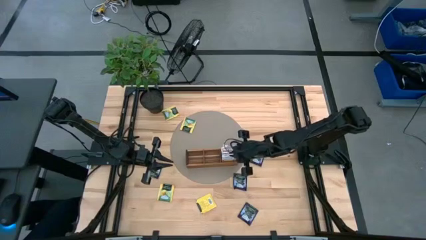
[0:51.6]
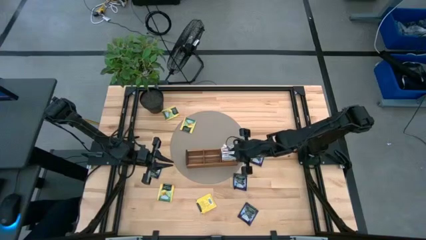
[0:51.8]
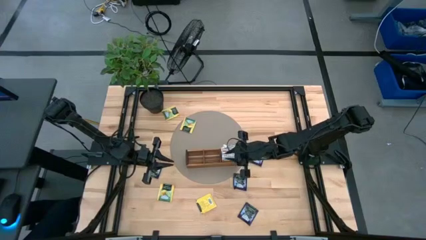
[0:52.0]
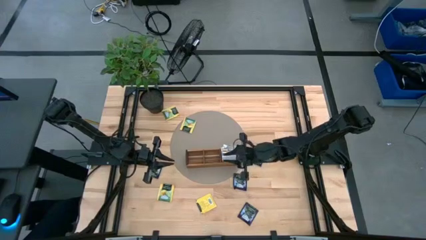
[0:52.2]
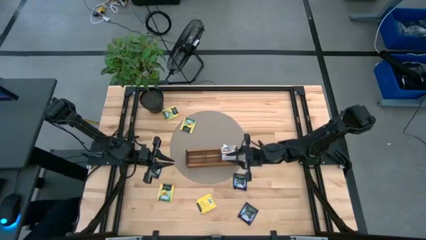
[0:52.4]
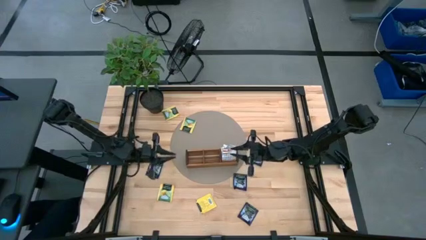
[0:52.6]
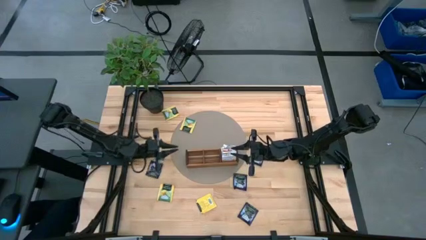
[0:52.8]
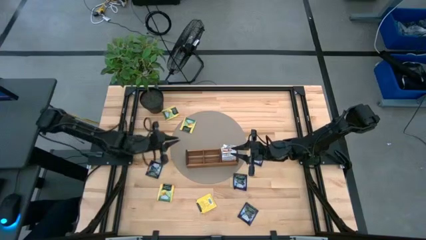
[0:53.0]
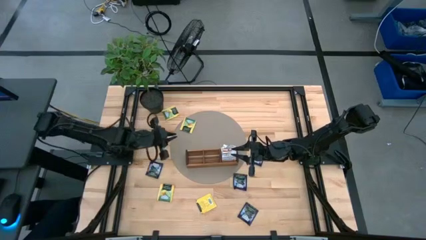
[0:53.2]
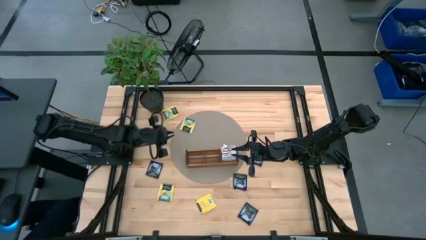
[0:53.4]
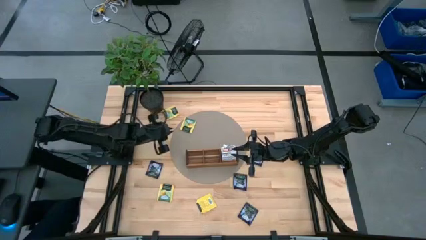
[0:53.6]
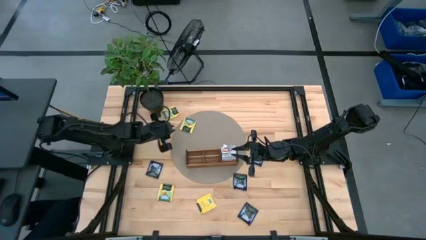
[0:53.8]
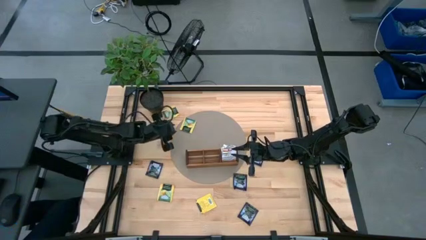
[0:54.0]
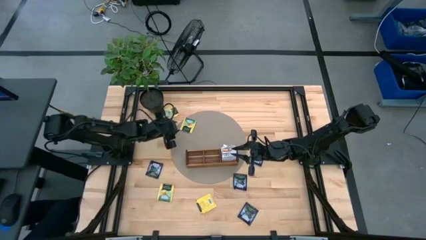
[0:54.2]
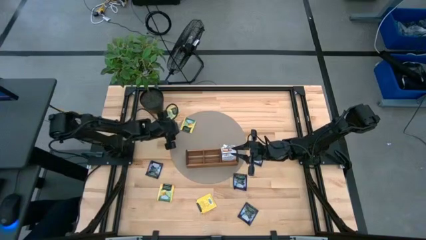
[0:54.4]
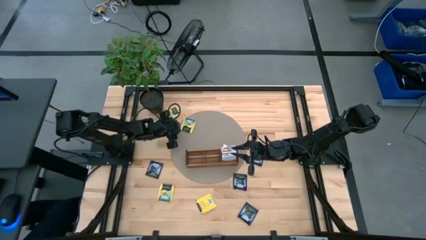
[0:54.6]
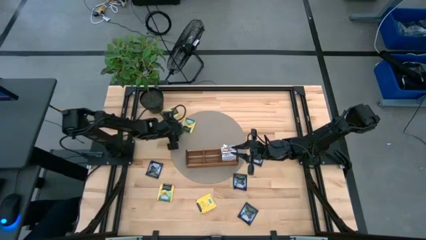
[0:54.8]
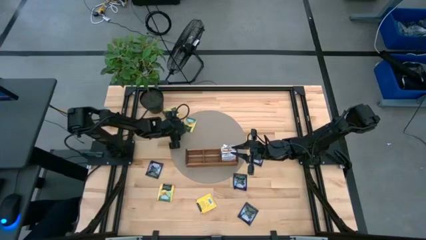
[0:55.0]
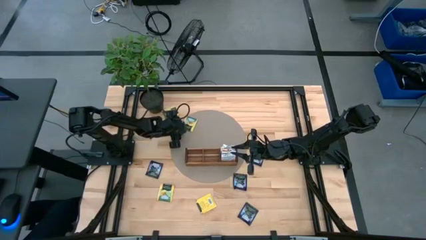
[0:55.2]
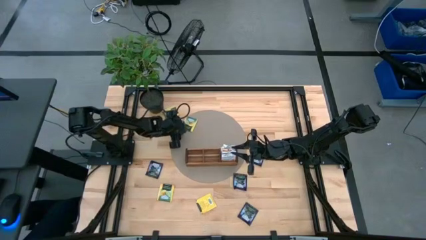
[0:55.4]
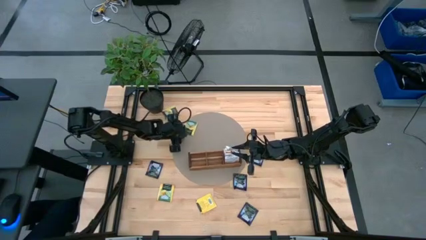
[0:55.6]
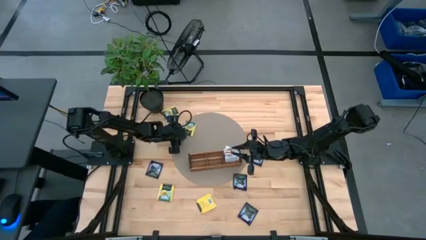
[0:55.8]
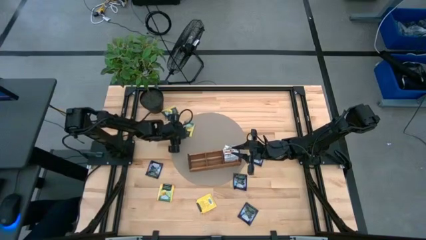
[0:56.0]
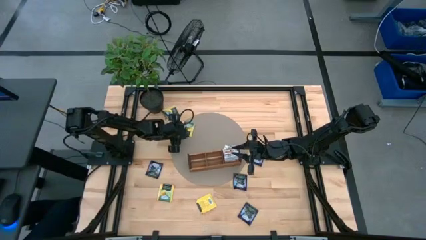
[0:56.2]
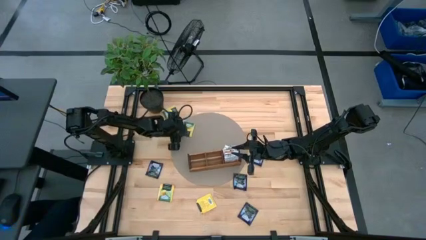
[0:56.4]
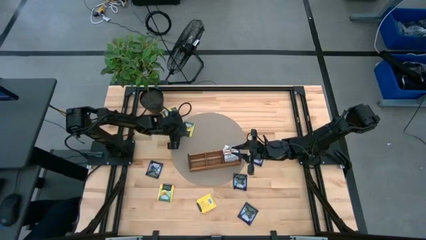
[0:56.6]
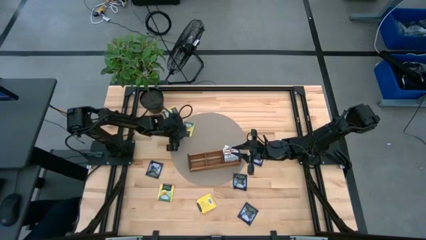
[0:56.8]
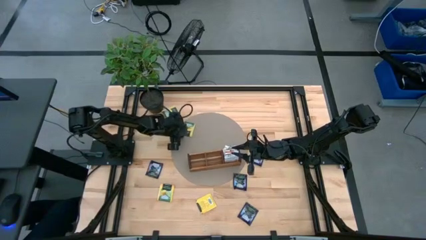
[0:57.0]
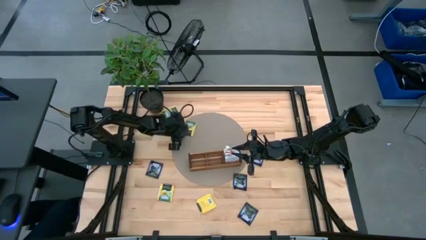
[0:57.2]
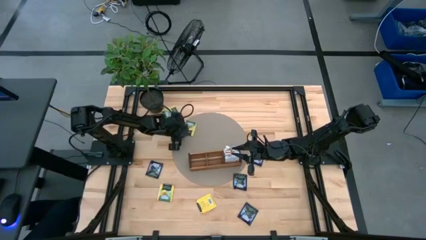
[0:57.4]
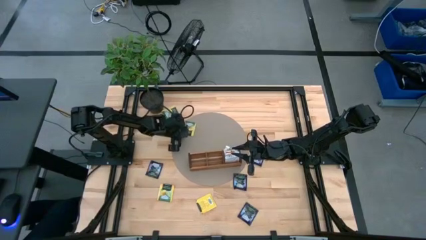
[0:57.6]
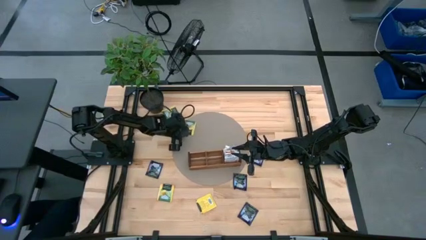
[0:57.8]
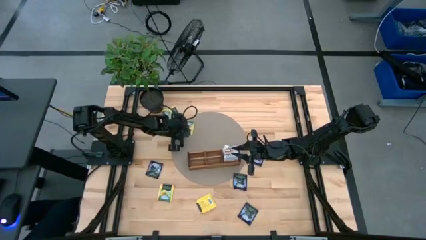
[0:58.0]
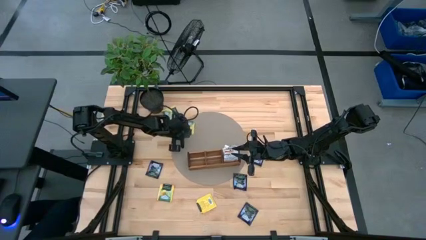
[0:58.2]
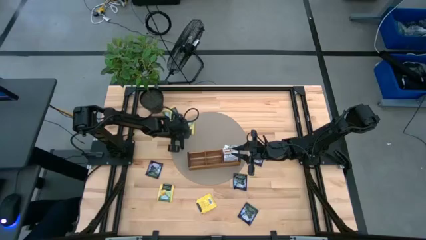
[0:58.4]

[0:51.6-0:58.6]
Task: Pick & Place Tea
Put the yellow tea bag into the middle section of the wooden organizer

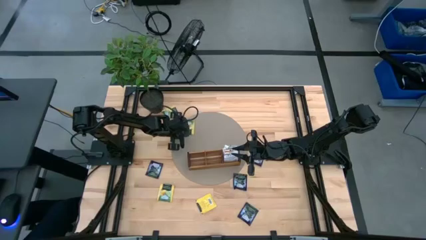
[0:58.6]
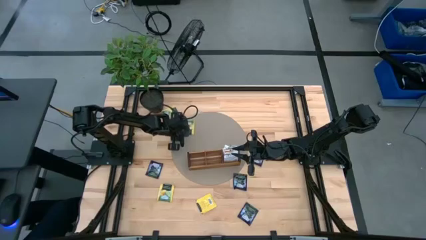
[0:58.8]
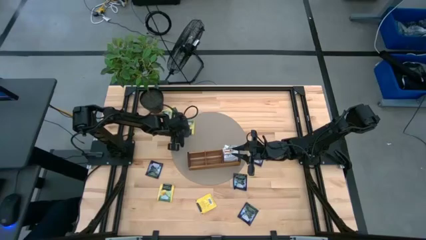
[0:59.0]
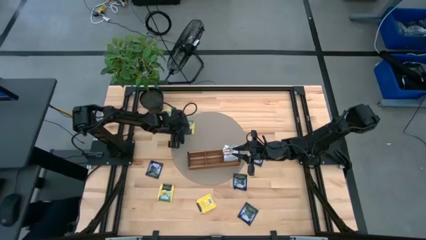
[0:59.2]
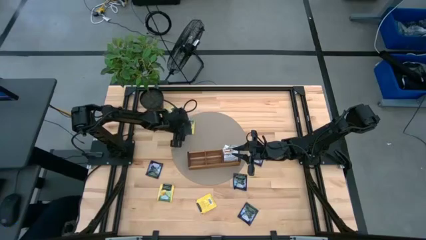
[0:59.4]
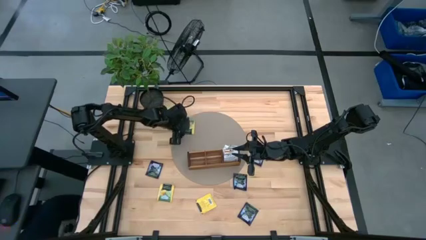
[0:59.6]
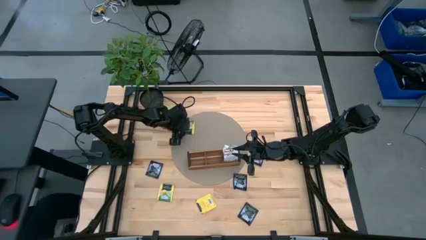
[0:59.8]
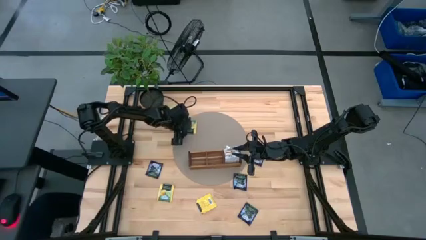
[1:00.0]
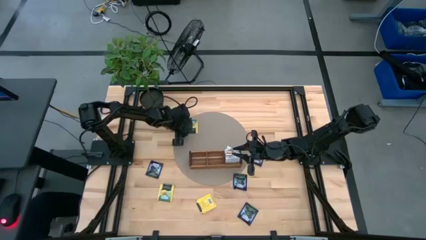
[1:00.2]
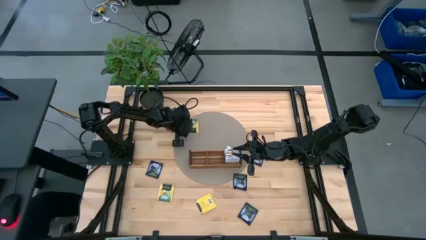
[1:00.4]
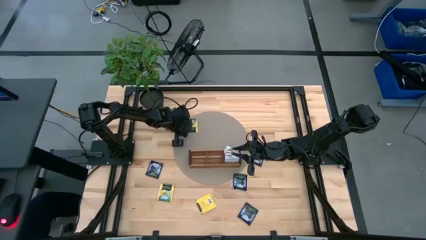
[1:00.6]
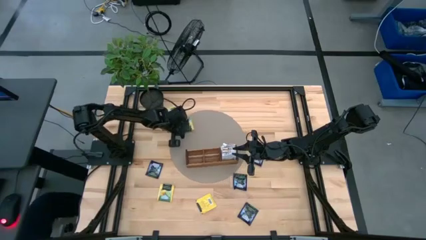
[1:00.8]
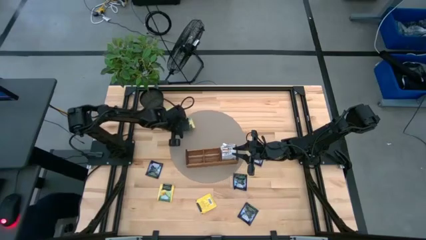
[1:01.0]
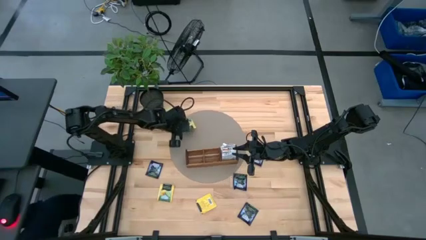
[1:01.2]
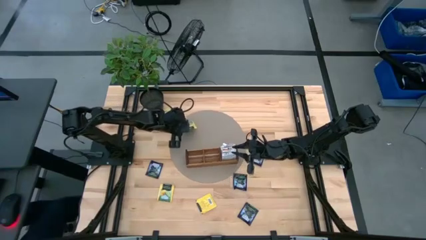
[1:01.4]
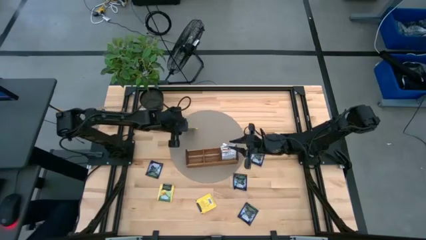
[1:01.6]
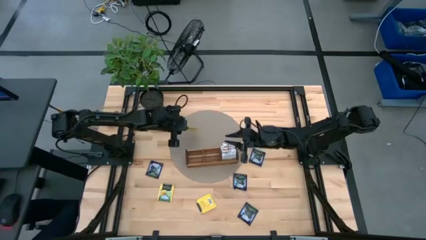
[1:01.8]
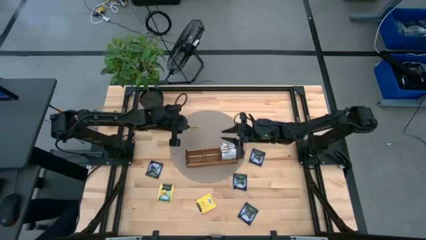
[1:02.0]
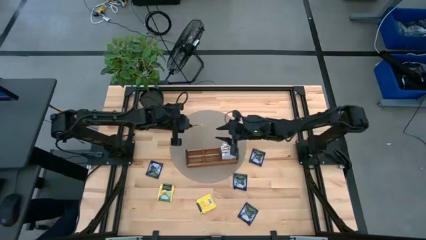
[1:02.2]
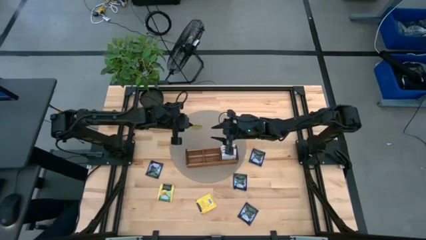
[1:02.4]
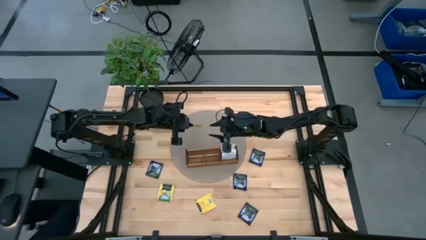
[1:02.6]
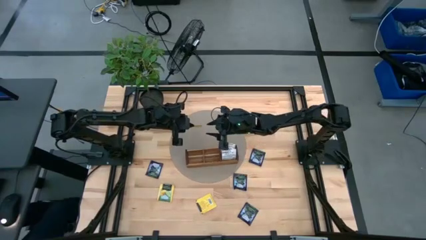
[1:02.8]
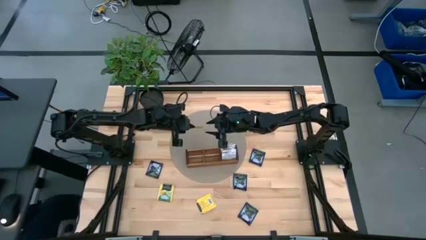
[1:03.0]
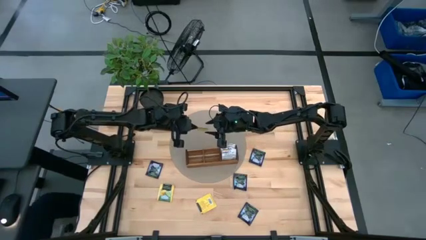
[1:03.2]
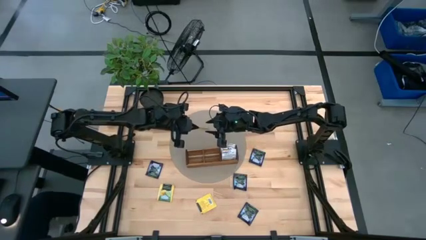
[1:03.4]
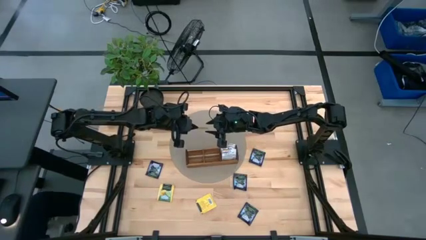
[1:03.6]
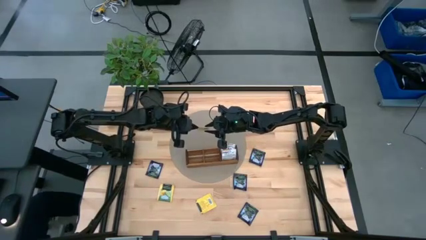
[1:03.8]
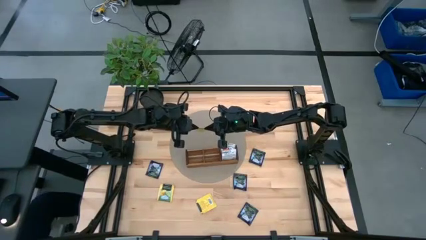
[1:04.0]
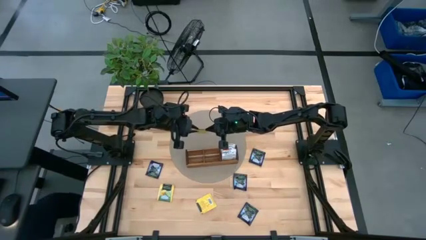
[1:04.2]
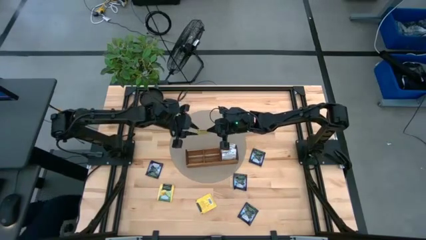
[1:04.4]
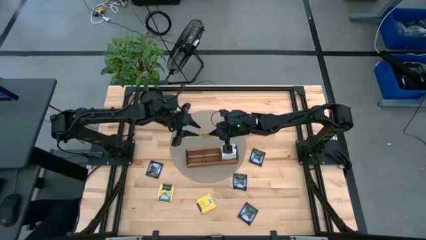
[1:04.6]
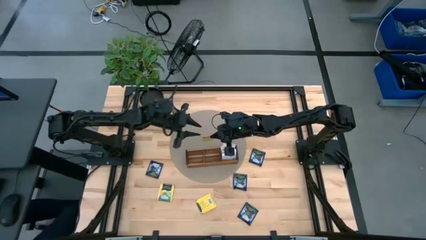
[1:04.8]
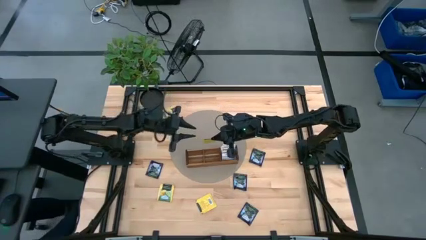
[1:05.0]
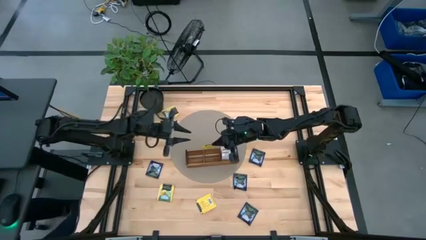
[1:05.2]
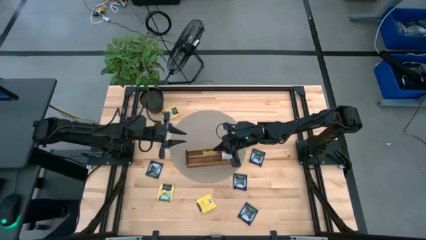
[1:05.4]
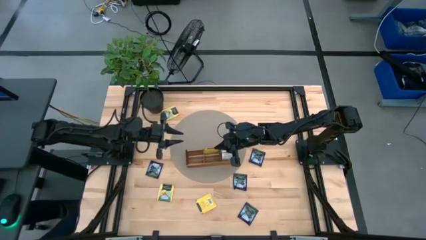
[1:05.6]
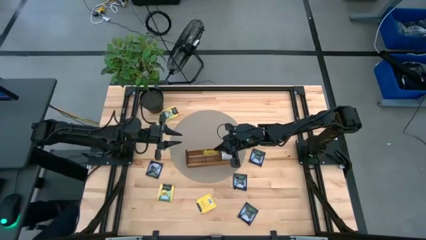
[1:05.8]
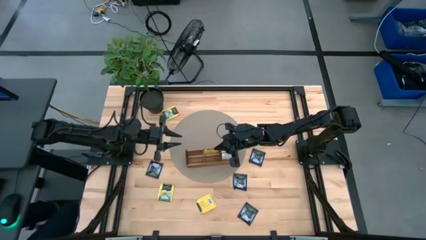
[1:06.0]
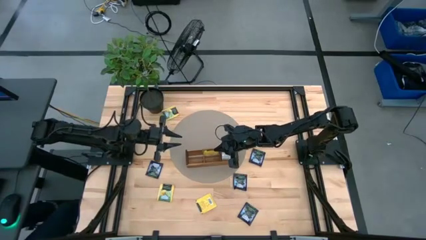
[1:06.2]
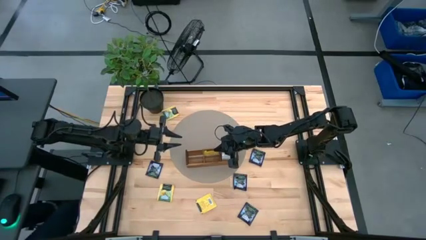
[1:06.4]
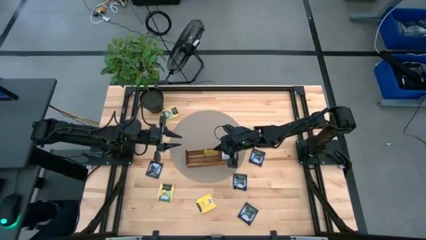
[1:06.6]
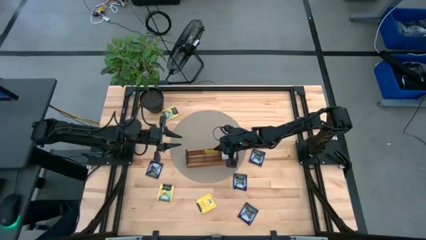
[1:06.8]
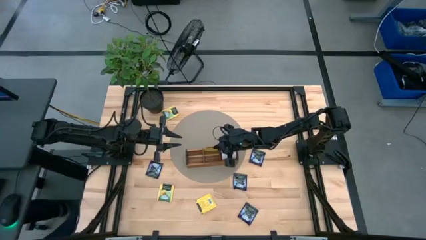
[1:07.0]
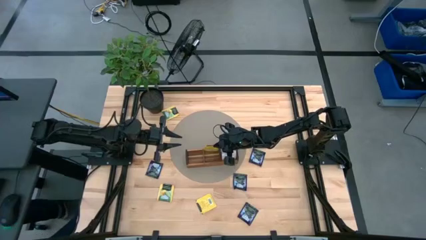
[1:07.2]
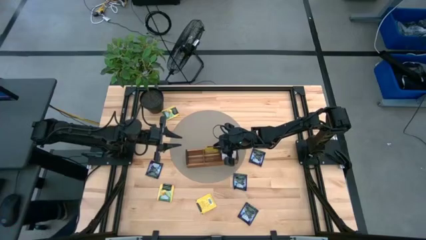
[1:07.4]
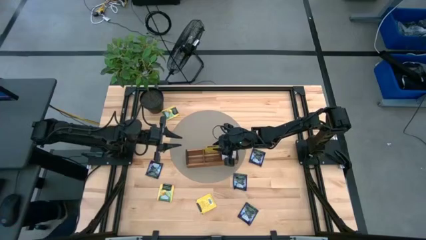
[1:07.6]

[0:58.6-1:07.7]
Put the yellow tea bag into the middle section of the wooden organizer

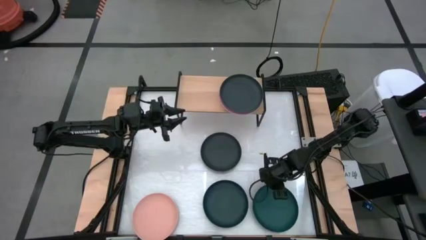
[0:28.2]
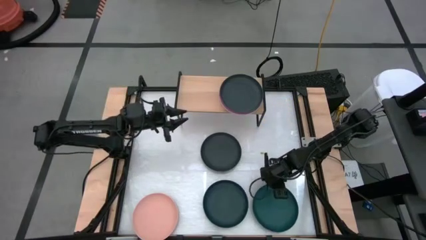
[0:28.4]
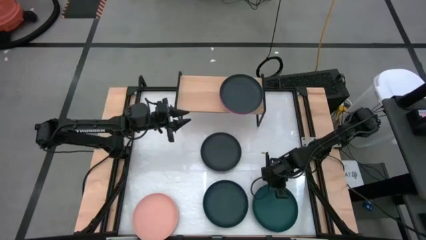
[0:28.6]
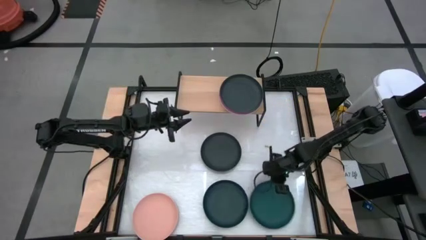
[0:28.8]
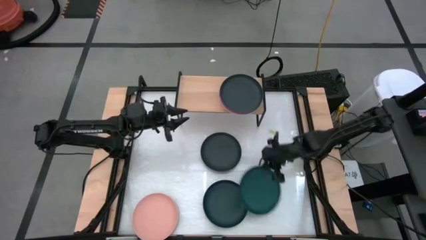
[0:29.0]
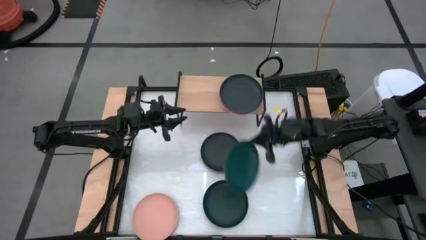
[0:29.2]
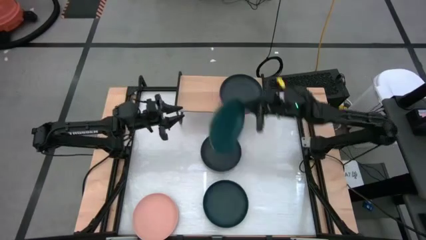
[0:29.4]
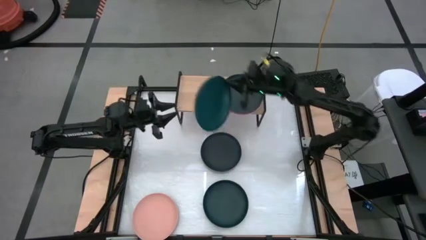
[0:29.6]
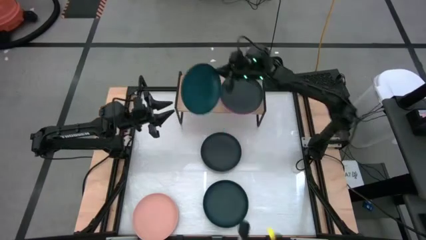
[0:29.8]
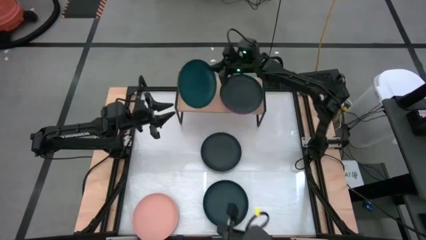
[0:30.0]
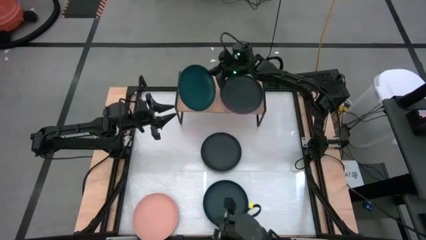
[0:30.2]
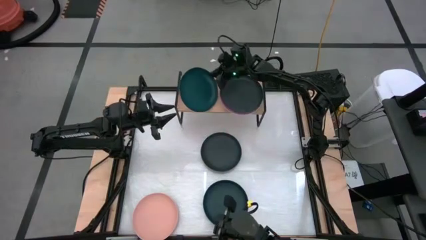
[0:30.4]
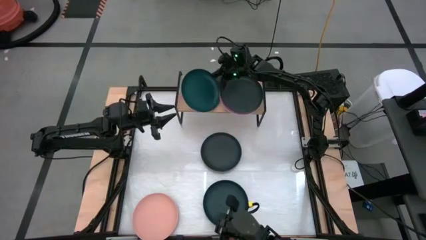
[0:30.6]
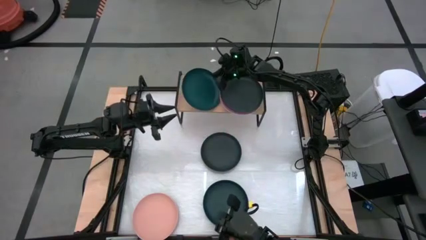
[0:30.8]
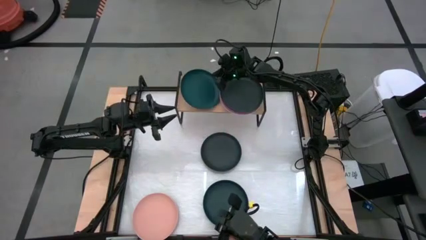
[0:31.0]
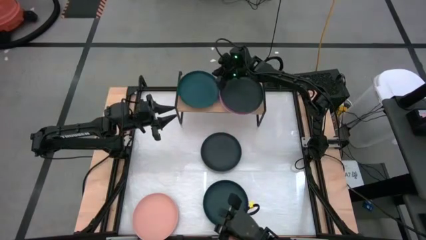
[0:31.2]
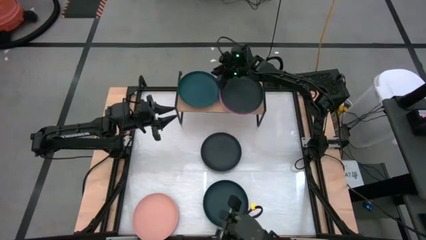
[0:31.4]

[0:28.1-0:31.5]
Task: Place and stack plates onto a shelf
Put the dark green plate on the shelf
